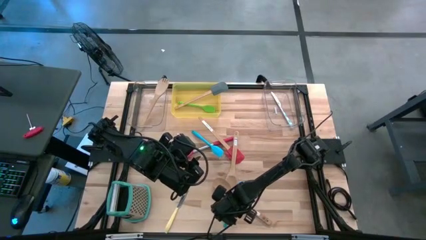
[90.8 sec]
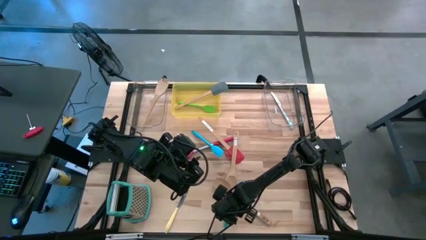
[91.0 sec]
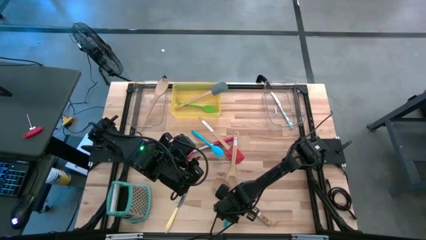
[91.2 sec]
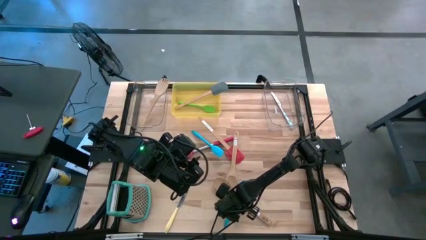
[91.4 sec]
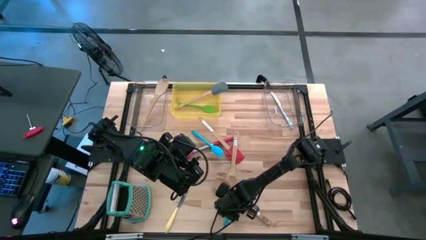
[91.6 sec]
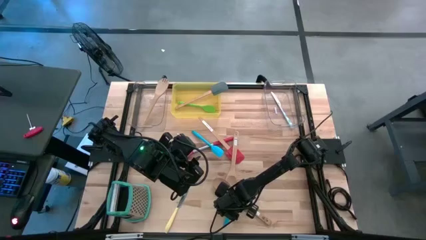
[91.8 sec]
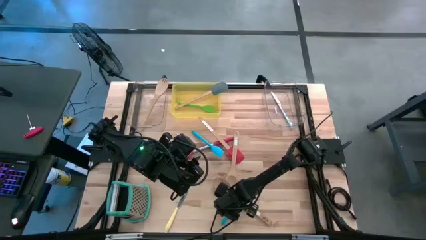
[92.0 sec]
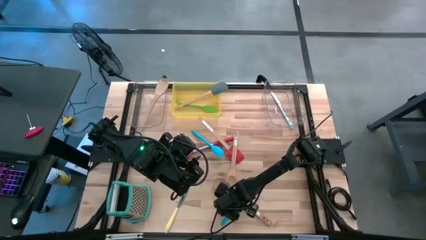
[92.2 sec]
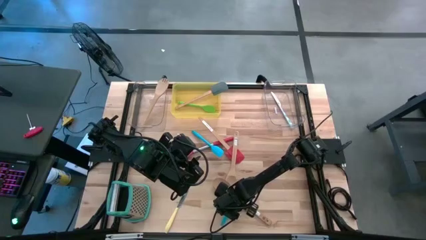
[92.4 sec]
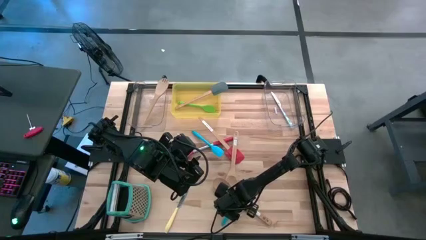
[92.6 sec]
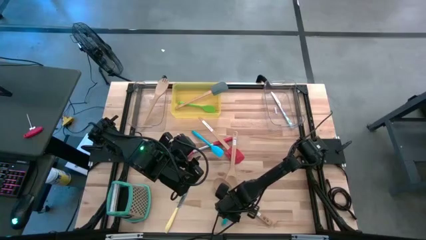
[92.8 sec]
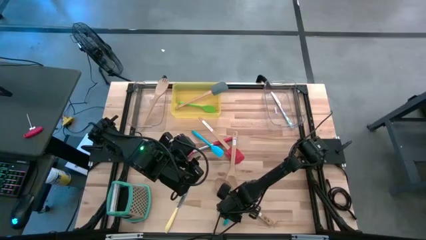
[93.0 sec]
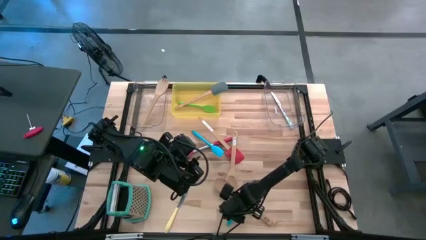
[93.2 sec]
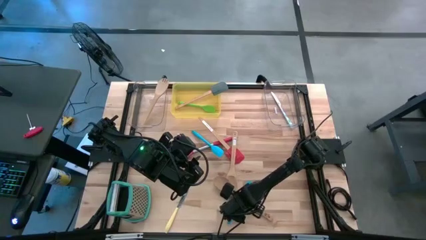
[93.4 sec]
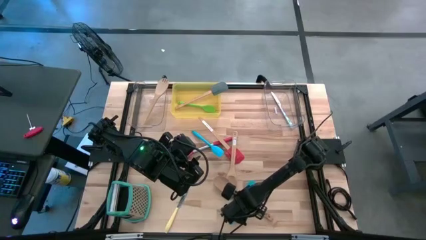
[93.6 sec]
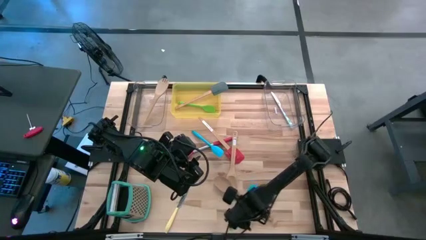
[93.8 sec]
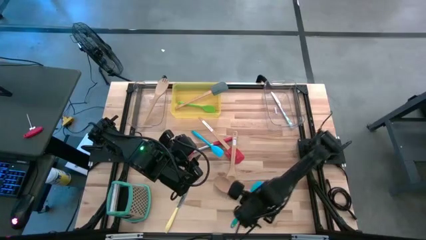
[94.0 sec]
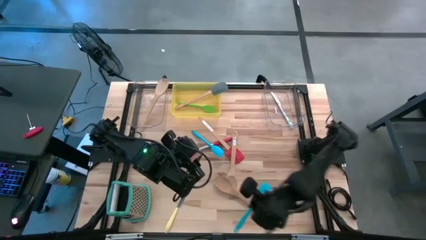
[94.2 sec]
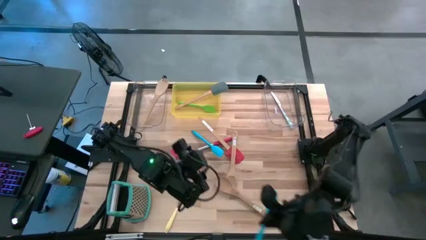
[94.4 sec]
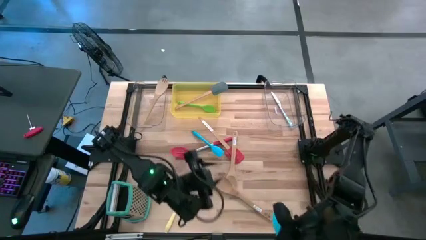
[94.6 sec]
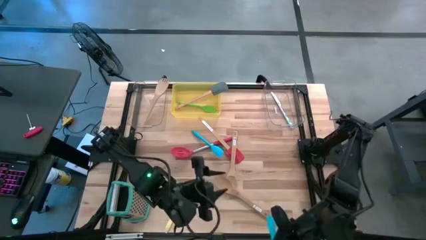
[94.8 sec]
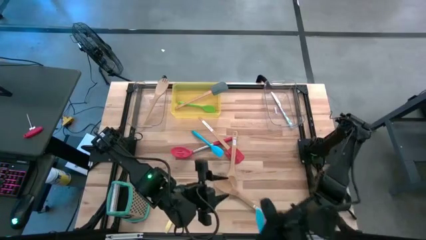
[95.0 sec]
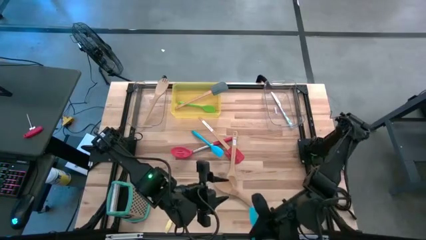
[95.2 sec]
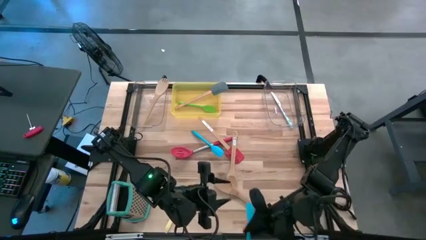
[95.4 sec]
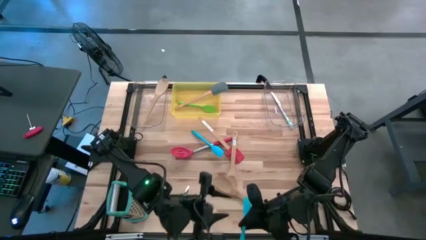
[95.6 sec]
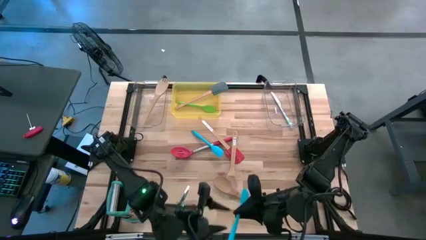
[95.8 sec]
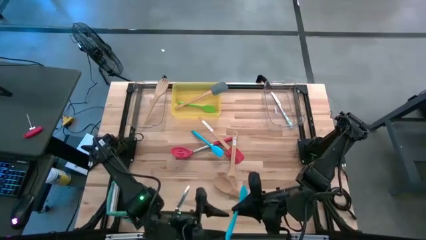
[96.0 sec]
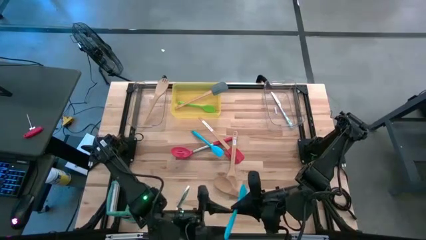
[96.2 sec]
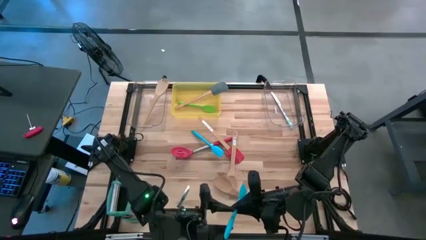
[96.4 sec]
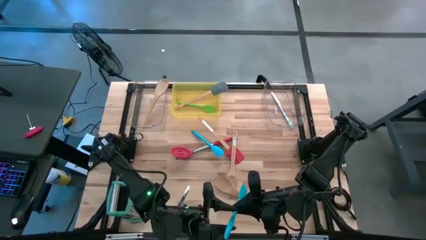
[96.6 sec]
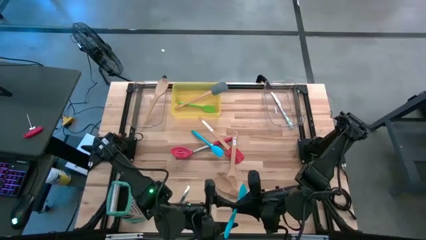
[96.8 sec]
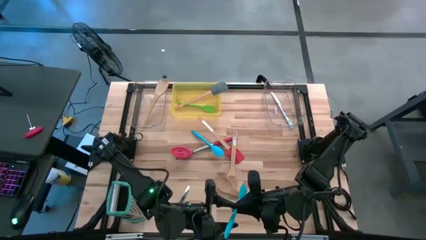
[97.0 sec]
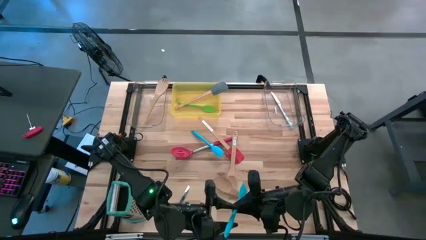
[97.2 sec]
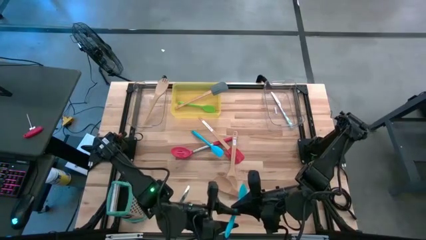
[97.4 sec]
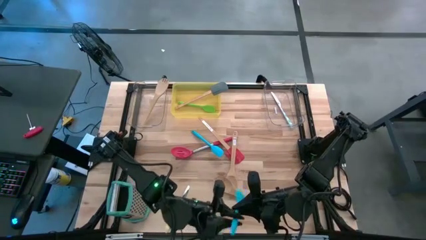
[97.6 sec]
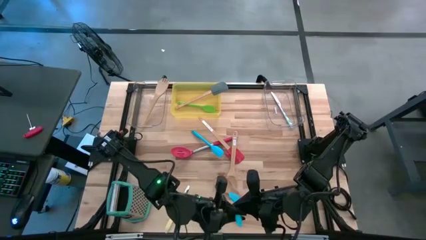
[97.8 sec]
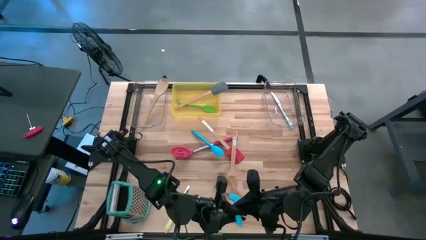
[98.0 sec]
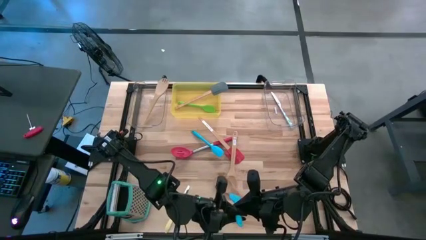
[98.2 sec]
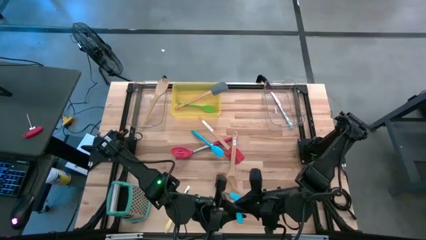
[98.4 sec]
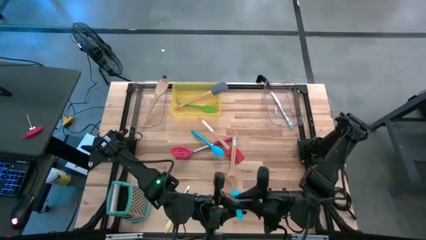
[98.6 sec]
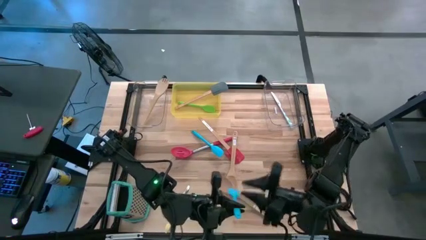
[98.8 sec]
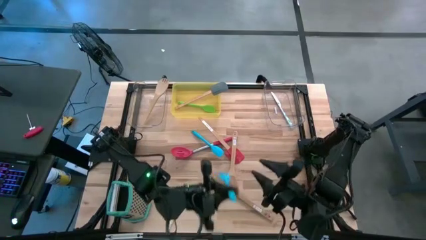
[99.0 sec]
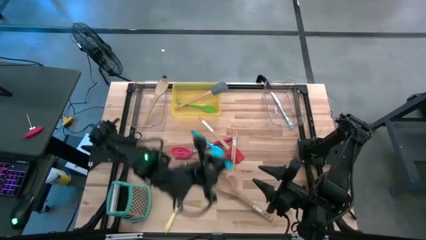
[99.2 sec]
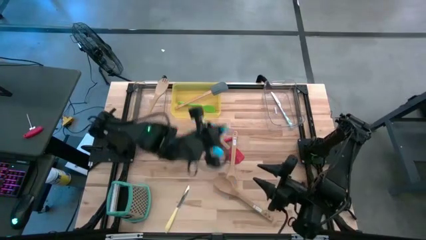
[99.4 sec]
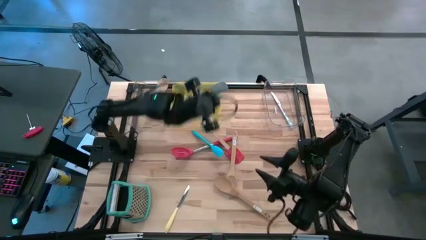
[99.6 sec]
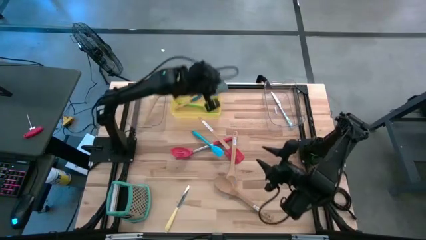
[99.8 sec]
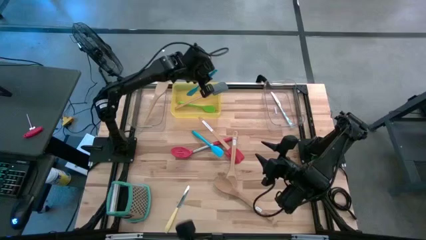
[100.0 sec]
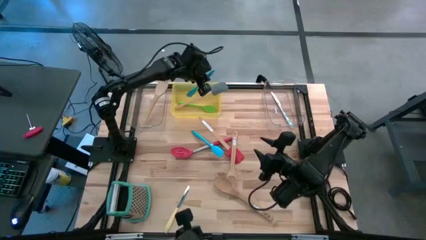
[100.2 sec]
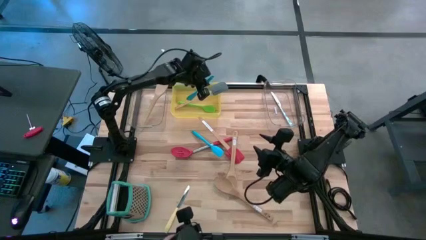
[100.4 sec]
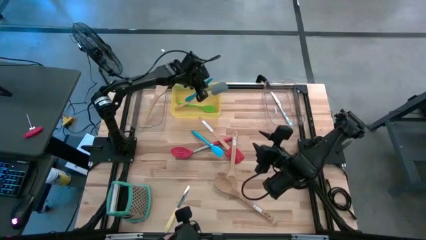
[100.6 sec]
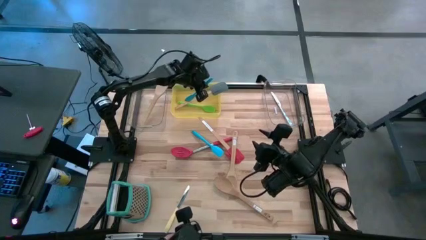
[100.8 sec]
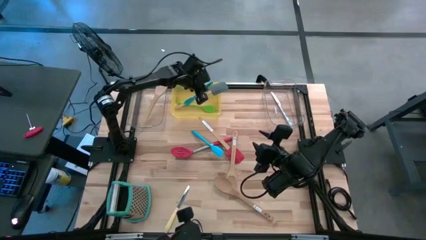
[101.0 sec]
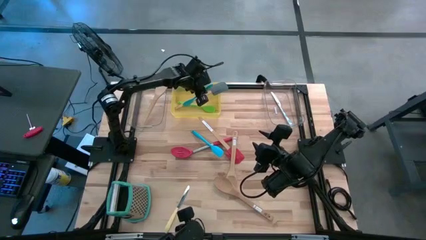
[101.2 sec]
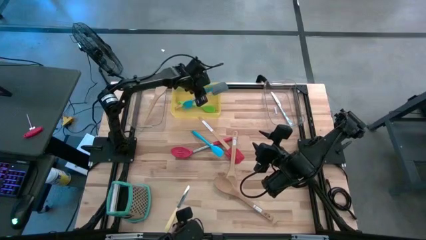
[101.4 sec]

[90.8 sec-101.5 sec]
Task: Pick & Place Kitchen Items
Put the blue spatula into the yellow bin

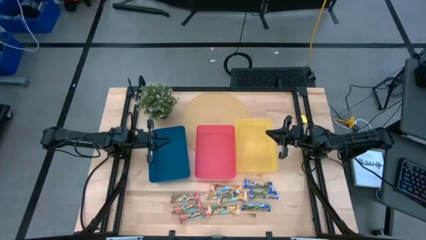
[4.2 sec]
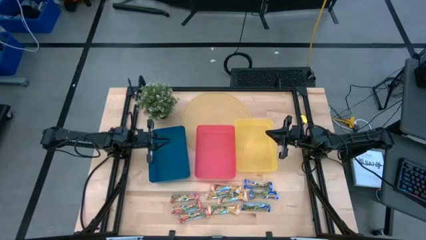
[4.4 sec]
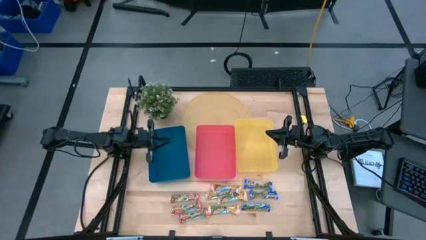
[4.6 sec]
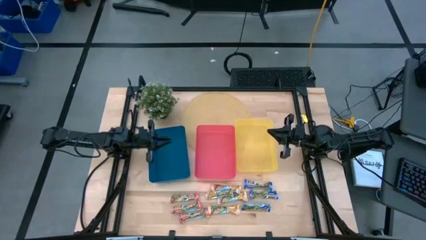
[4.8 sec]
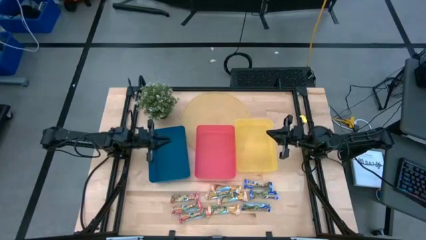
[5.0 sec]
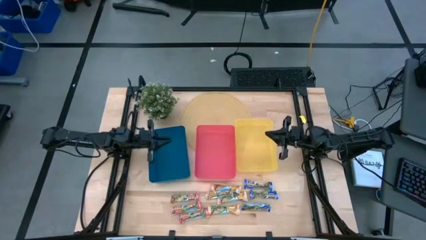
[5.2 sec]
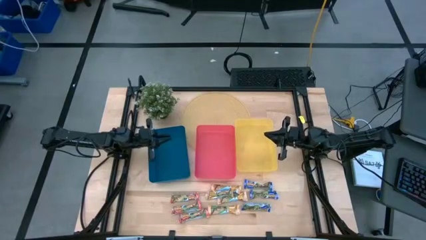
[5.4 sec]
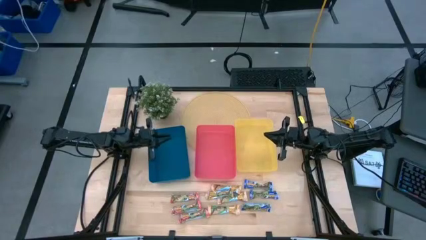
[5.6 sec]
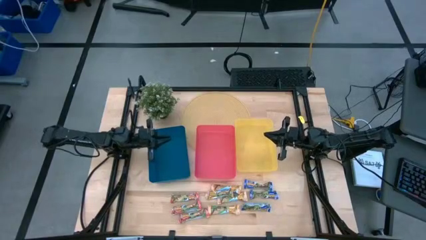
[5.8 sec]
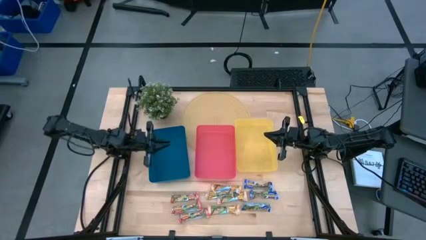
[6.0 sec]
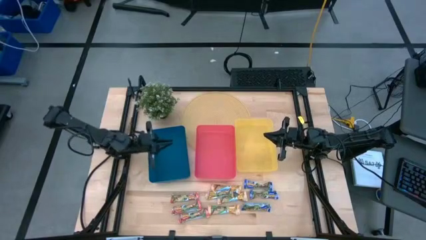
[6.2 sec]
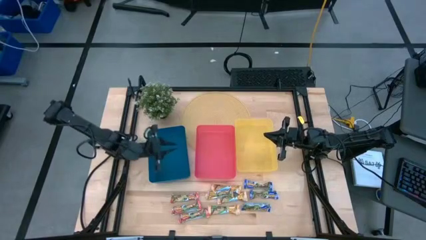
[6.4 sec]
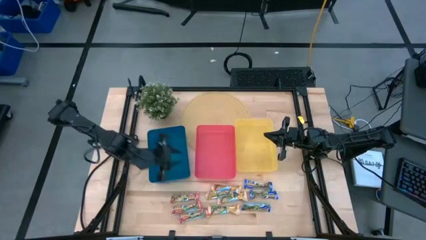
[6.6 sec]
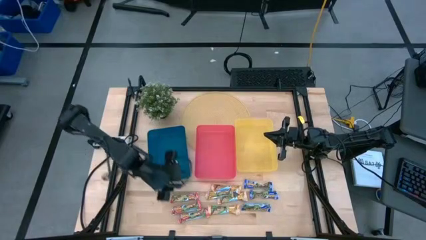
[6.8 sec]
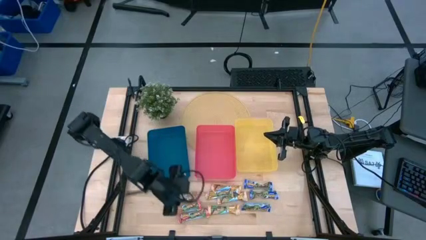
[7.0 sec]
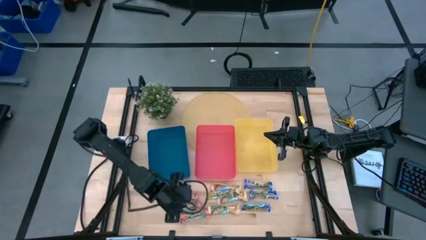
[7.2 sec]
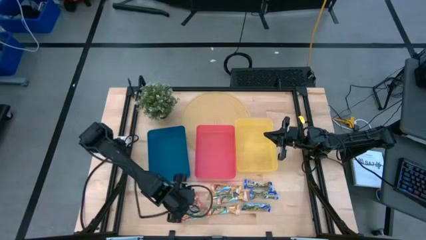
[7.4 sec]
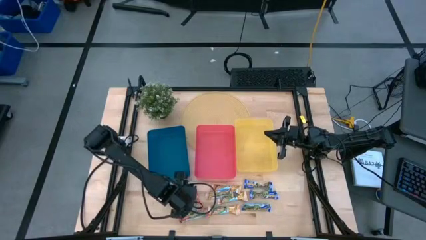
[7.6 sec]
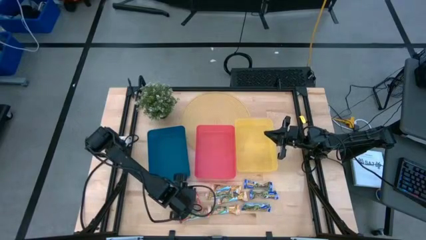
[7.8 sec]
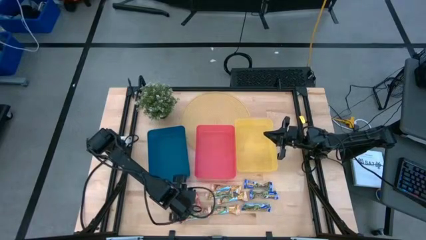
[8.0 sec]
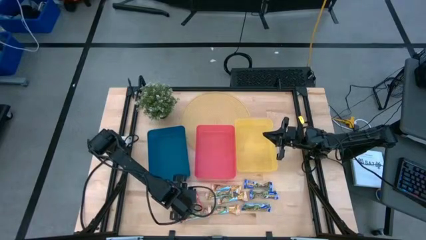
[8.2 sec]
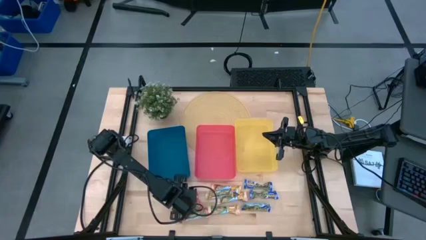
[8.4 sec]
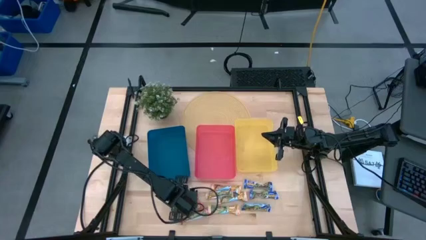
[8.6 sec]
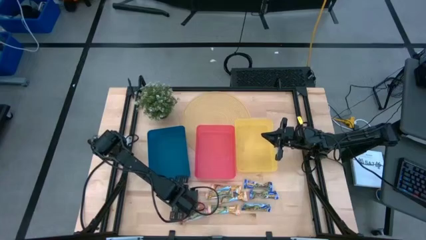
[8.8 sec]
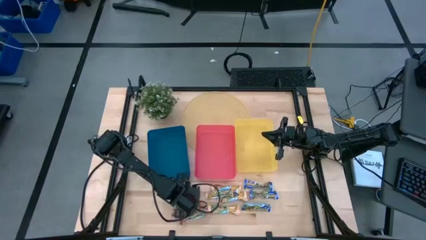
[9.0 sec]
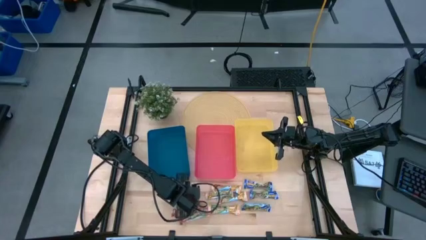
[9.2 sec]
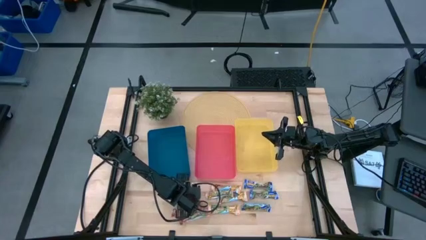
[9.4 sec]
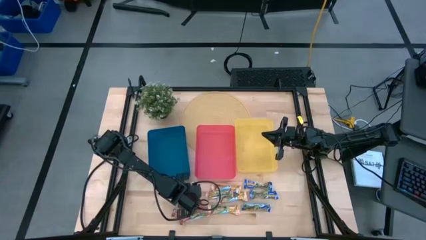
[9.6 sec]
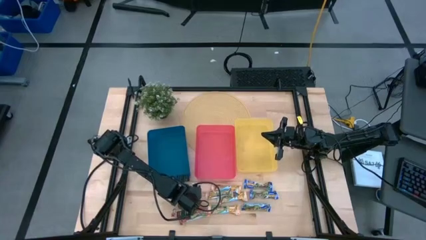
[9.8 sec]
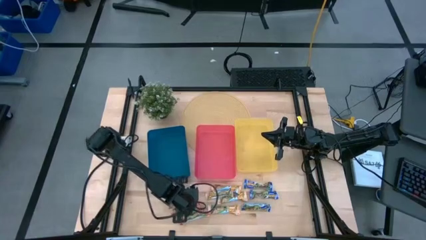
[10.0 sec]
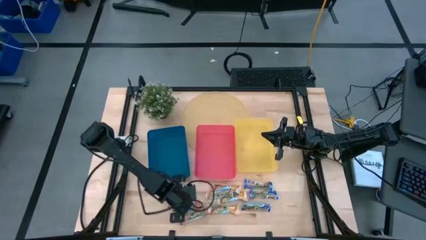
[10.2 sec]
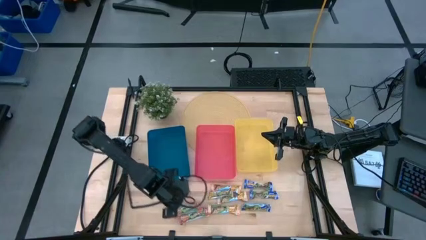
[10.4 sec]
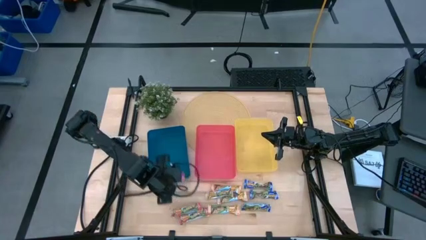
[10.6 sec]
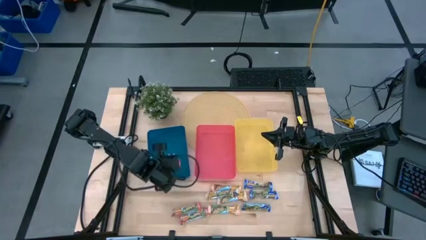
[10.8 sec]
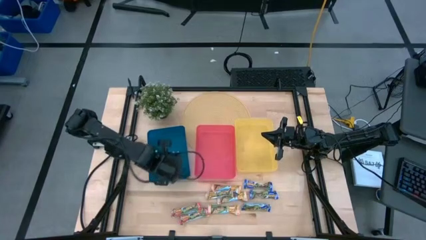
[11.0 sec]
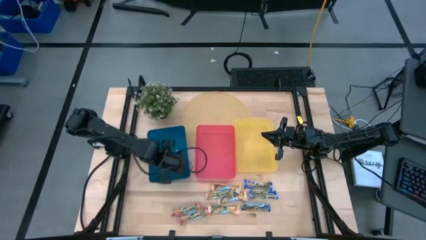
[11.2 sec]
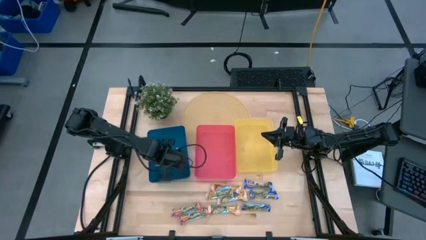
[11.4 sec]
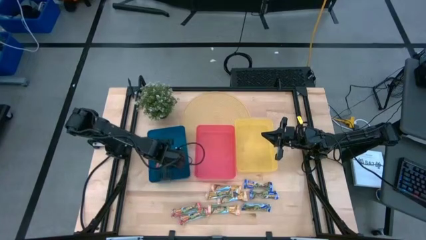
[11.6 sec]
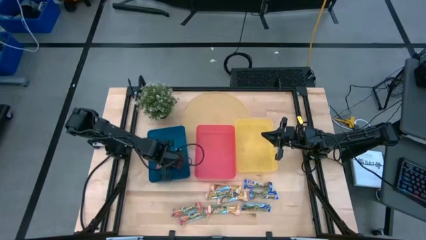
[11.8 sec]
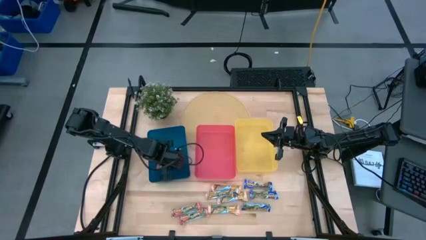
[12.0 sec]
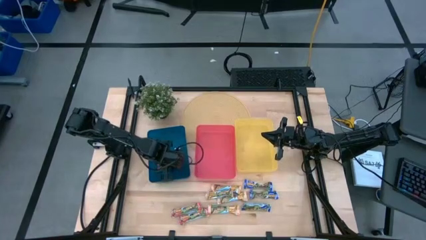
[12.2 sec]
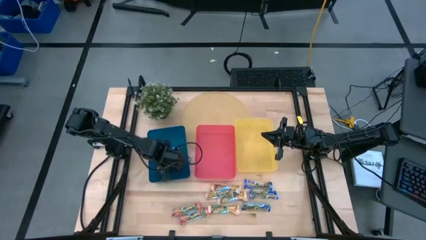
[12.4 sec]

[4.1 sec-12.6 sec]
Task: Pick and place Granola Bars by type
Put the top red granola bar into the blue bin
